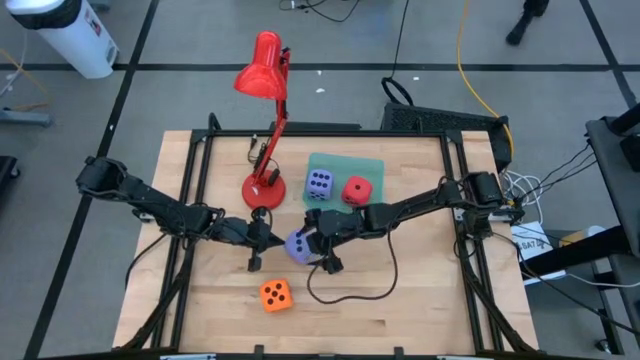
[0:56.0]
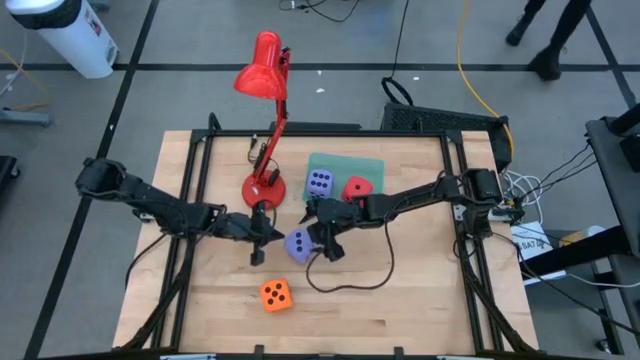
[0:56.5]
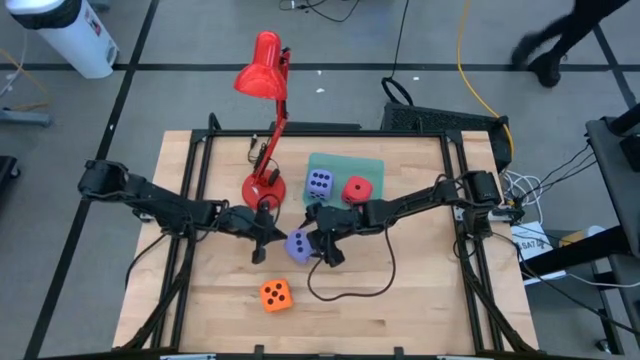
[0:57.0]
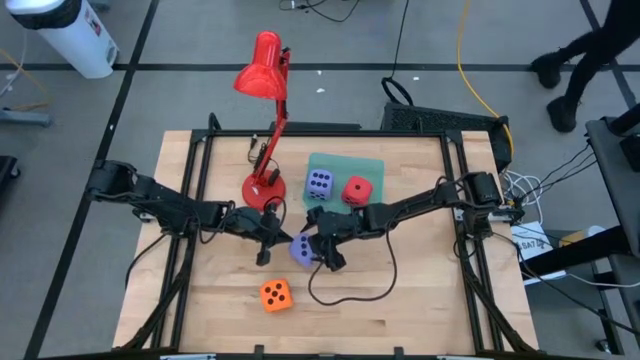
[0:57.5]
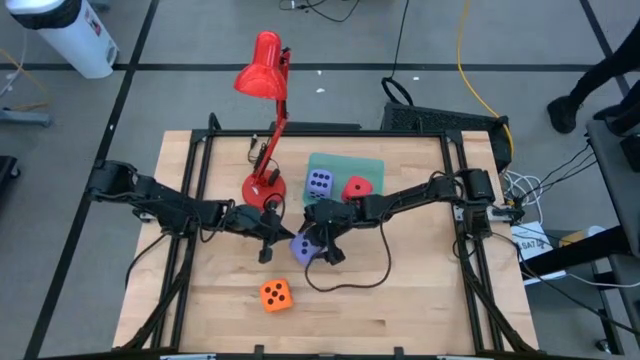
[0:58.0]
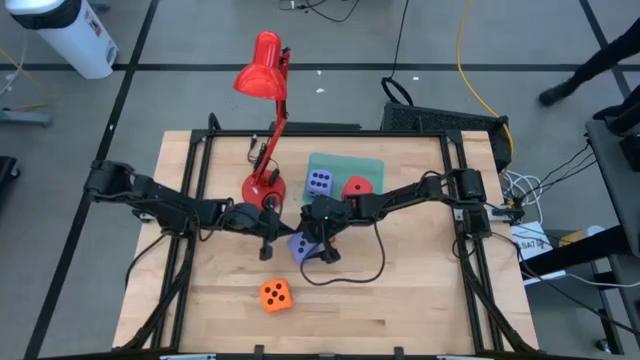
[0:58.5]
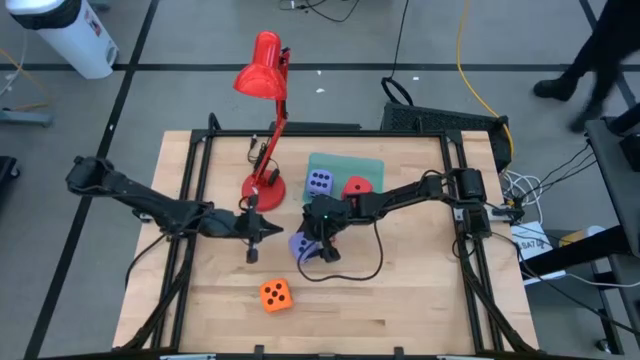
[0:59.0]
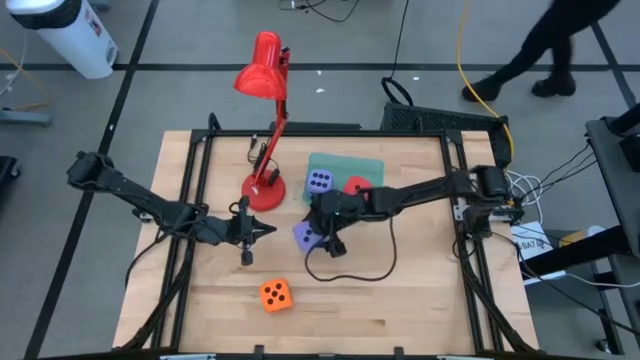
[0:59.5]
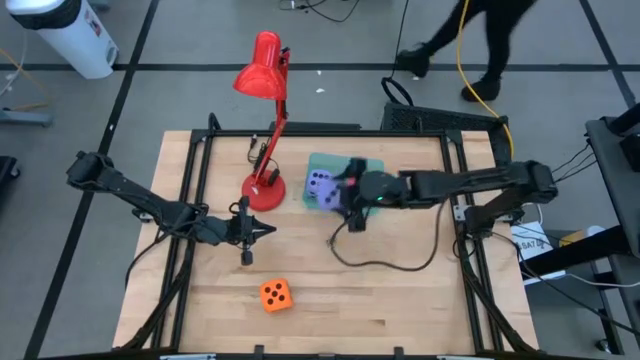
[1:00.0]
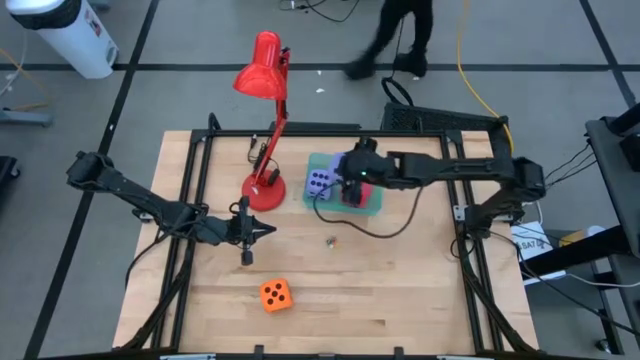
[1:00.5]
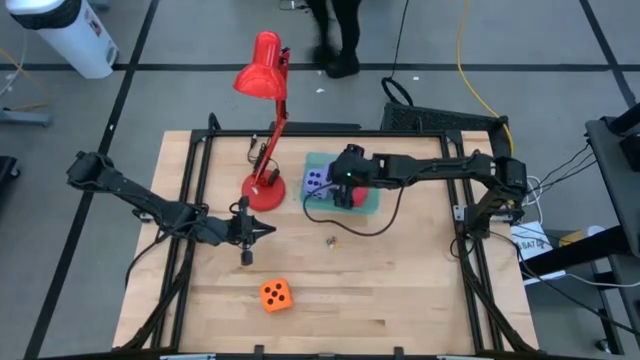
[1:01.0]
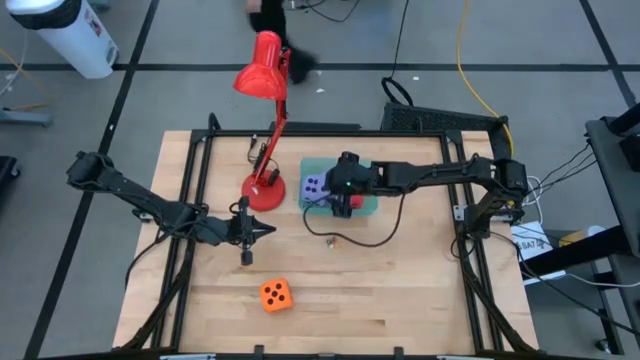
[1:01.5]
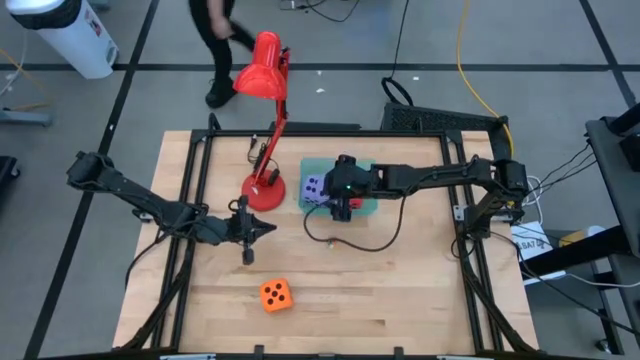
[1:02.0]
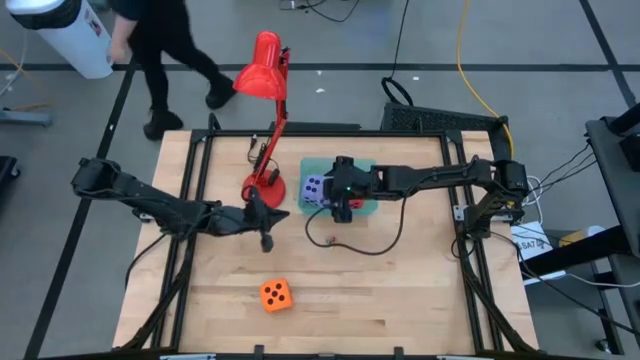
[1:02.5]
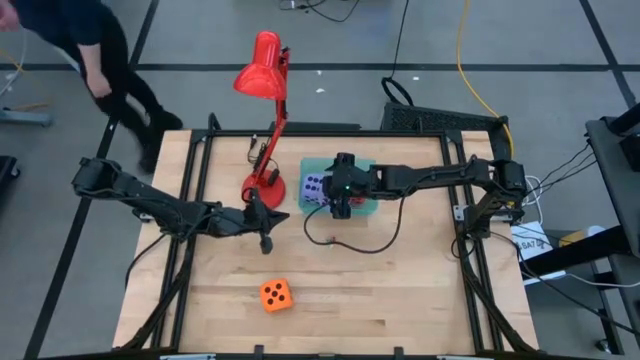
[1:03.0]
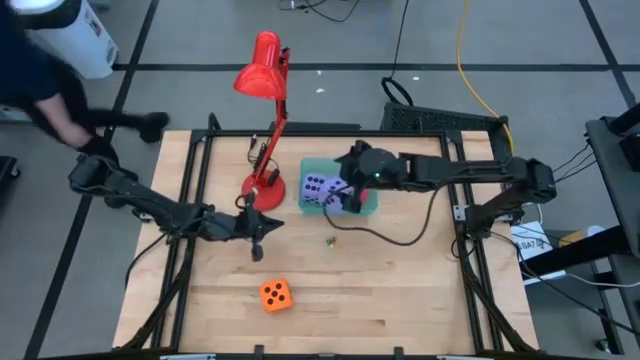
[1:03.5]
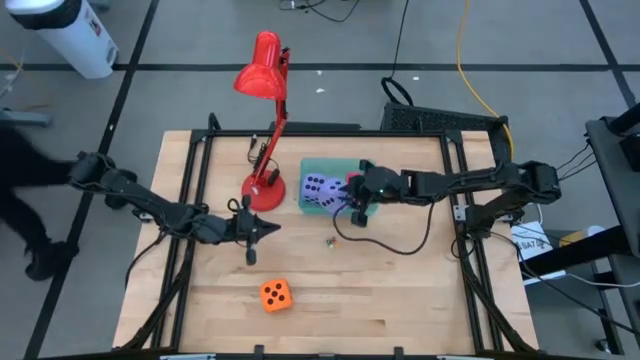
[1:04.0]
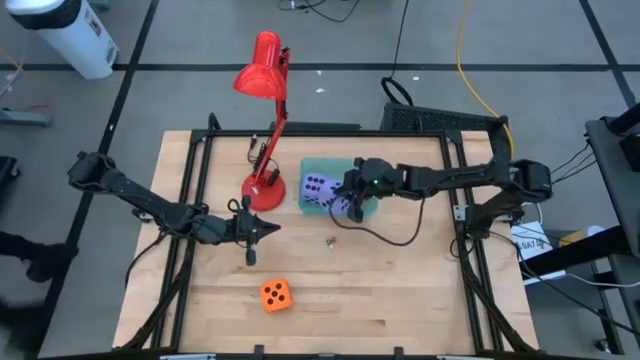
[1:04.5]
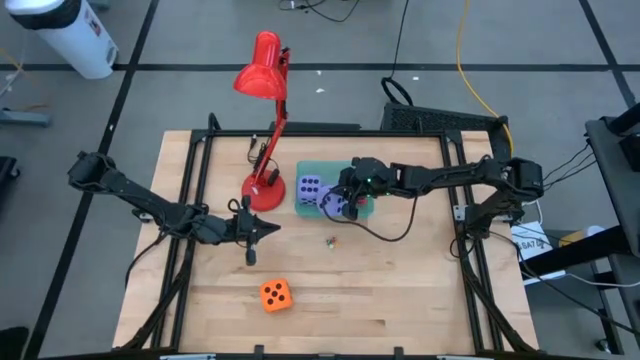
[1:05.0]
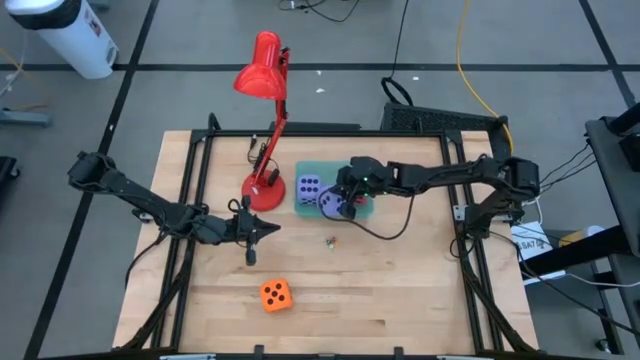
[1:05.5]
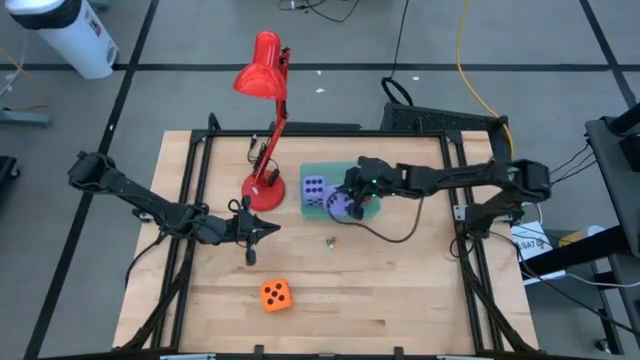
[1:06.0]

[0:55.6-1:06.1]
Task: Pick & Place Dice
Put the large purple die into the blue bin

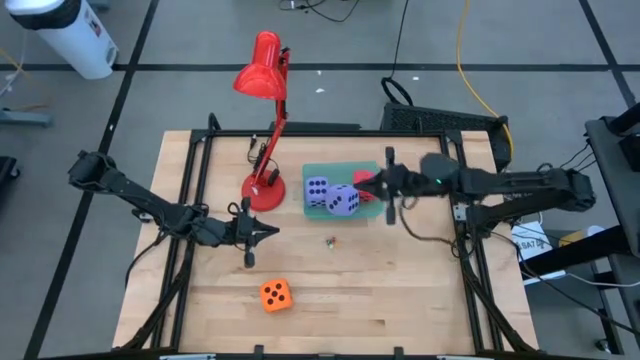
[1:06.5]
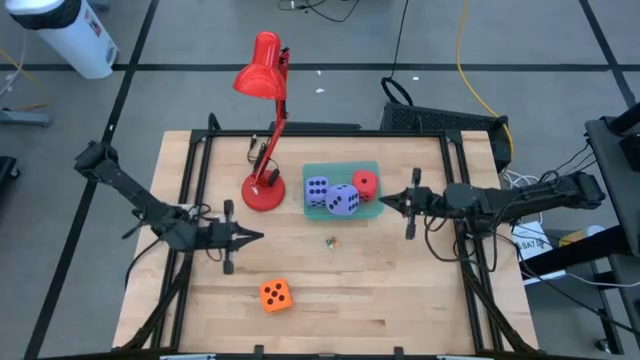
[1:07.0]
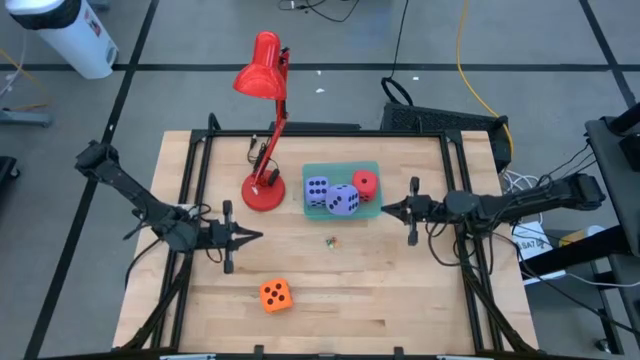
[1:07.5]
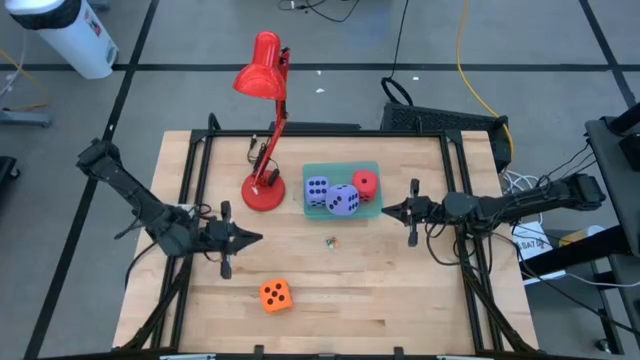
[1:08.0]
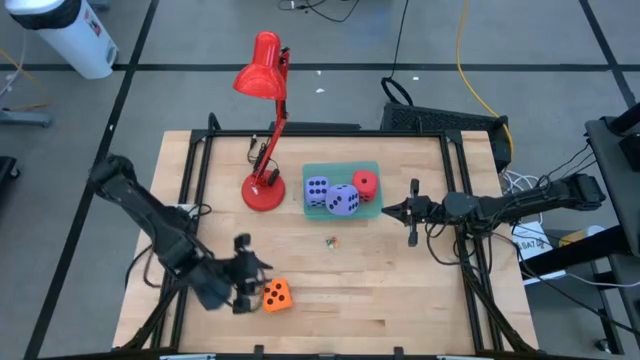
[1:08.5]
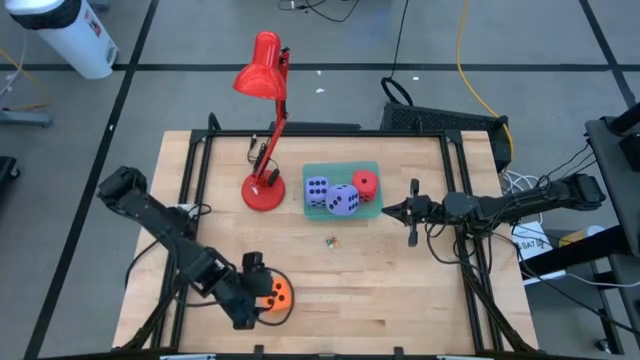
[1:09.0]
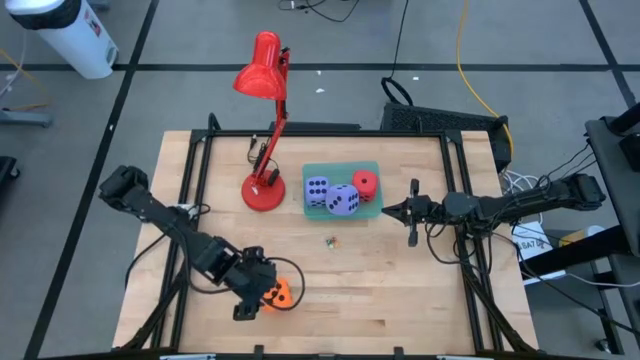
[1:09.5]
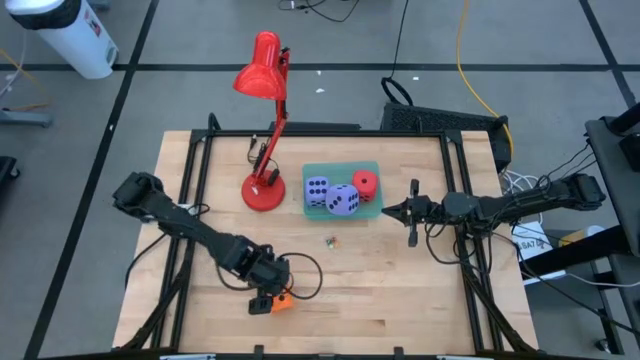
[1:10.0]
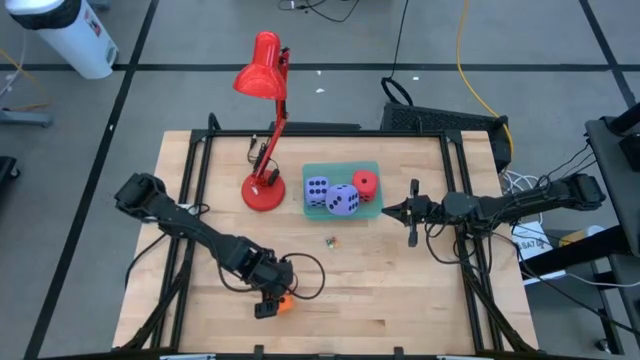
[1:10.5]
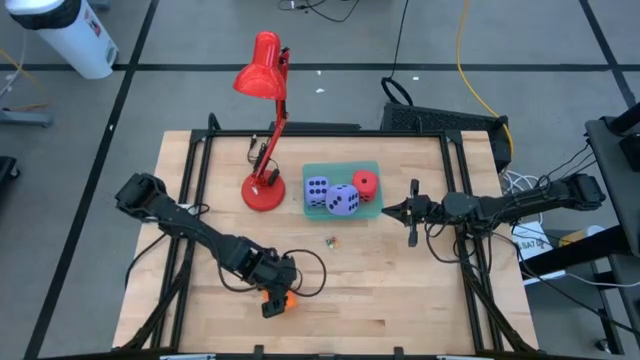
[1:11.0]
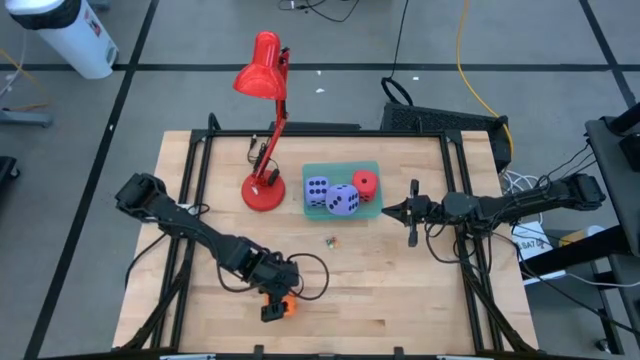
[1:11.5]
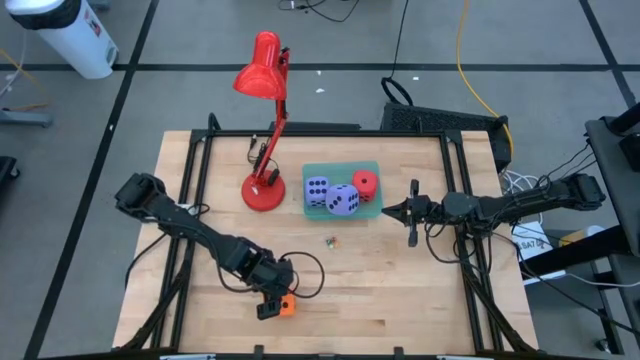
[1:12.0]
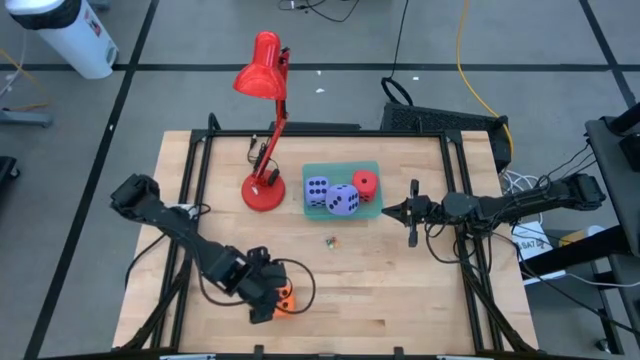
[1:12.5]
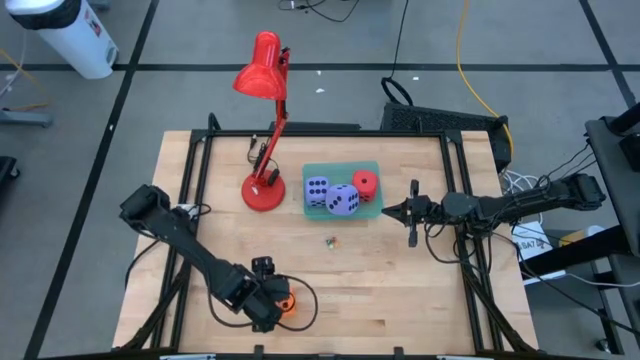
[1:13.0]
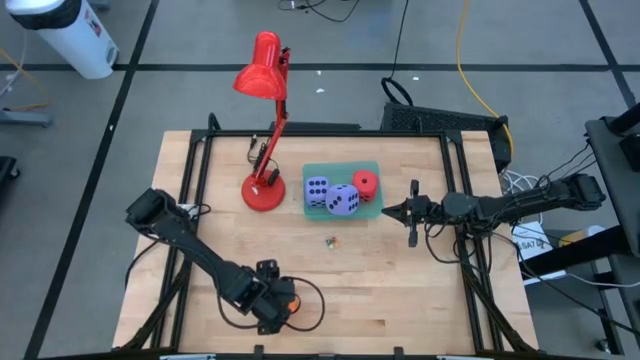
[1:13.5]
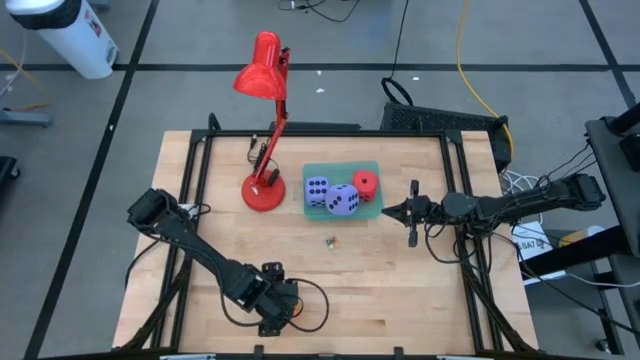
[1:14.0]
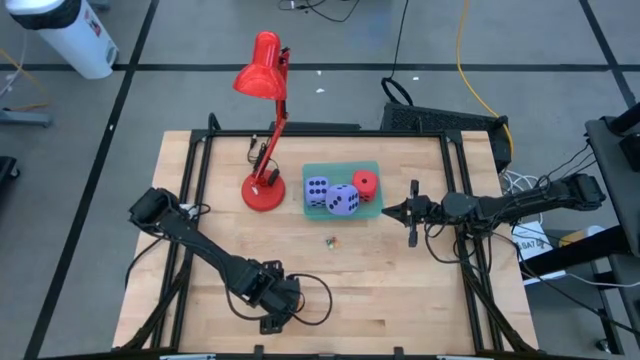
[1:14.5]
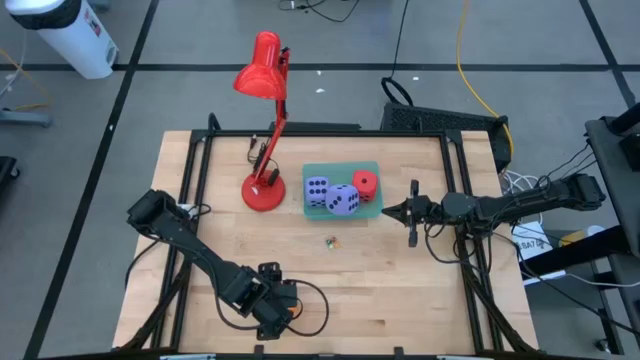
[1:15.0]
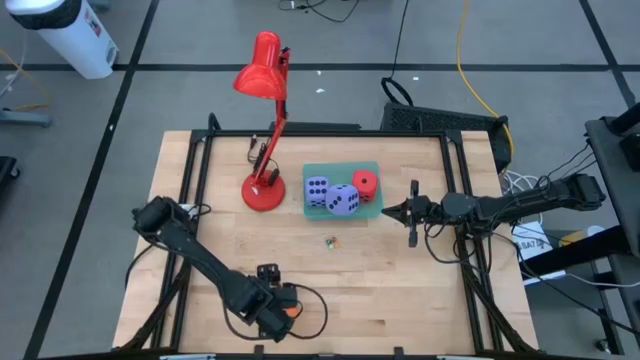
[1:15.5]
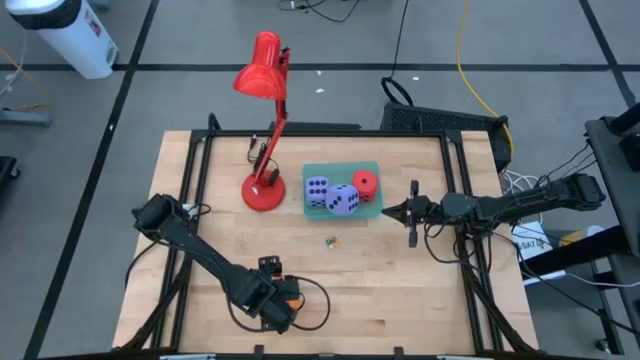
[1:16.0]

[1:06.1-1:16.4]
Put the large orange die into the blue bin
